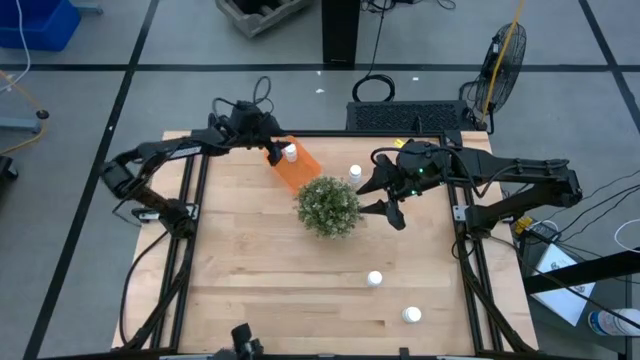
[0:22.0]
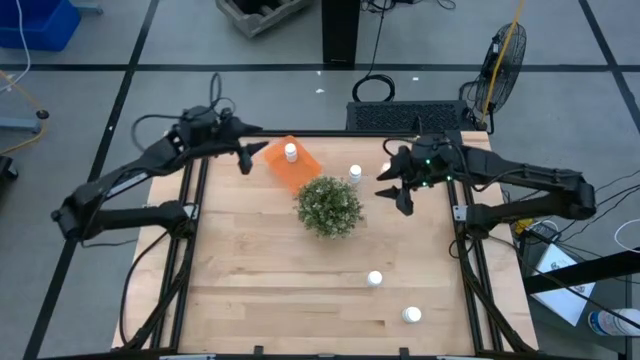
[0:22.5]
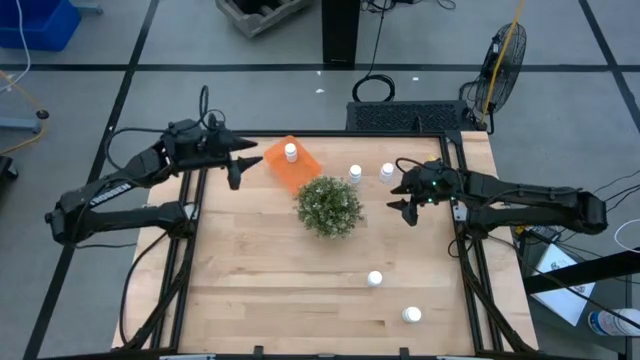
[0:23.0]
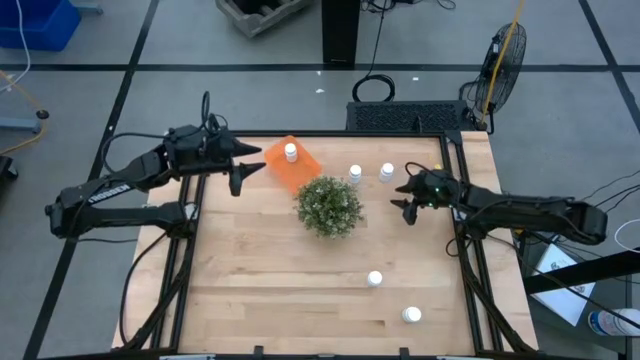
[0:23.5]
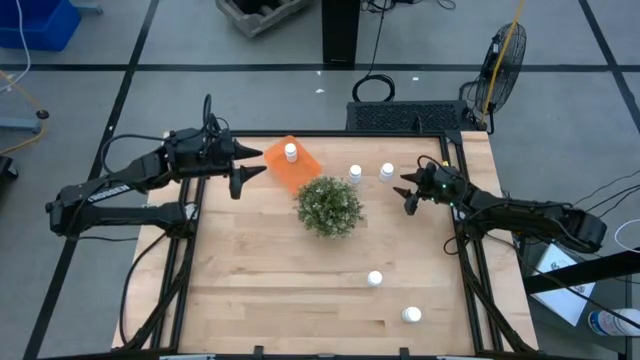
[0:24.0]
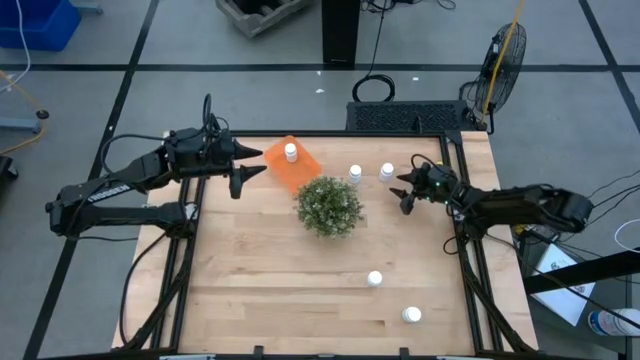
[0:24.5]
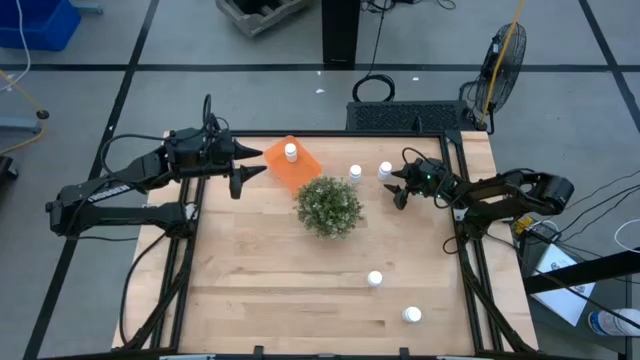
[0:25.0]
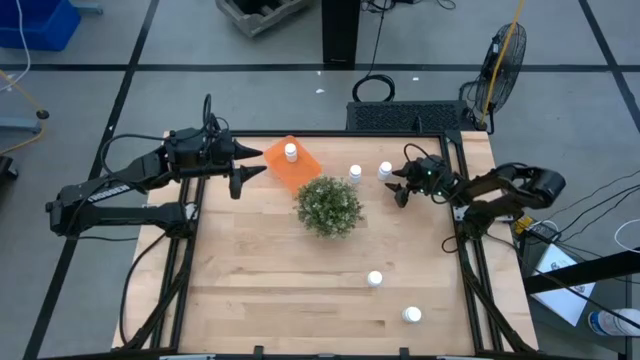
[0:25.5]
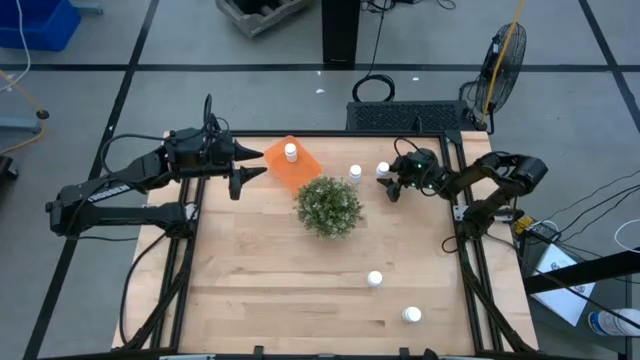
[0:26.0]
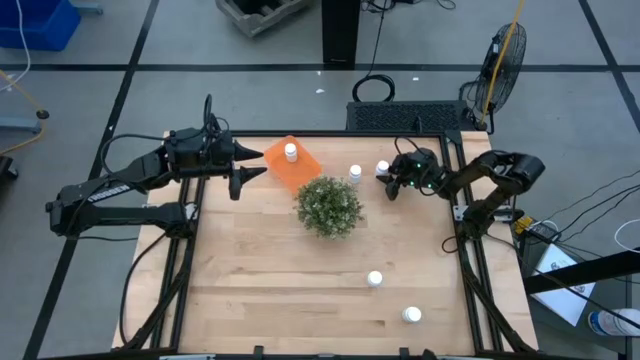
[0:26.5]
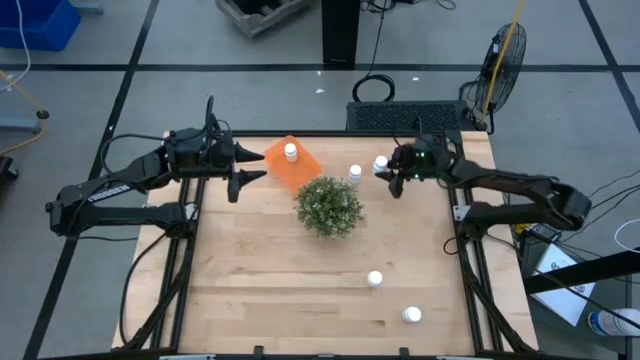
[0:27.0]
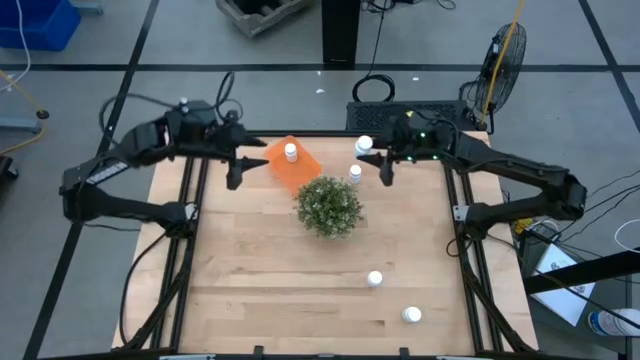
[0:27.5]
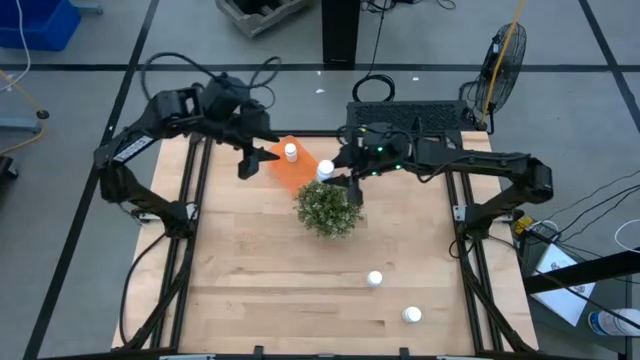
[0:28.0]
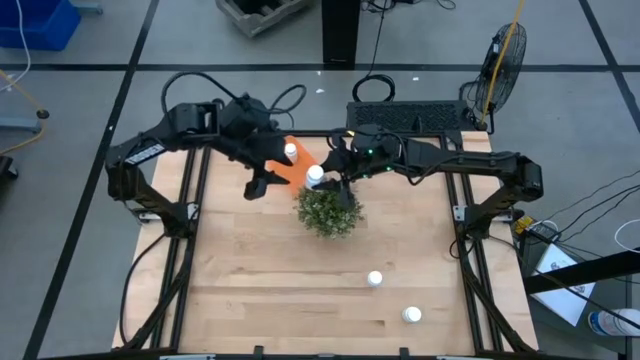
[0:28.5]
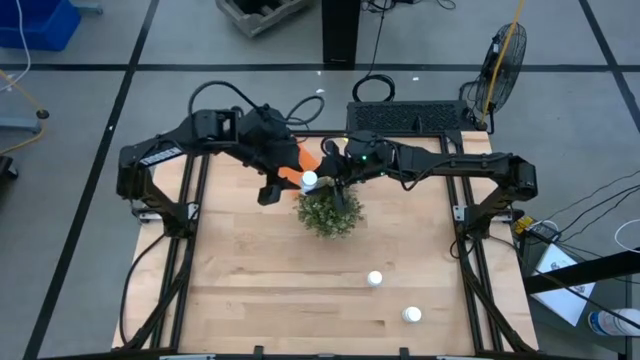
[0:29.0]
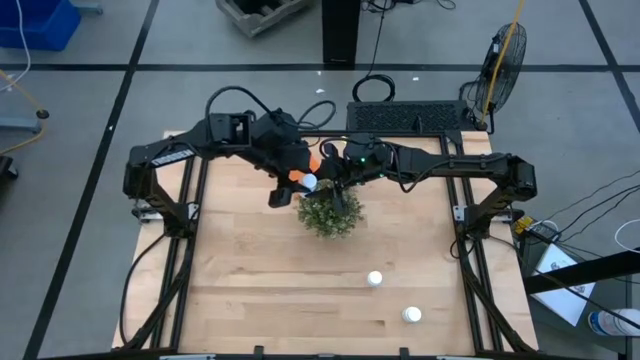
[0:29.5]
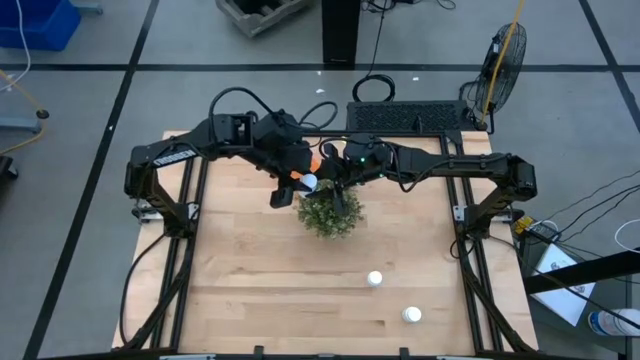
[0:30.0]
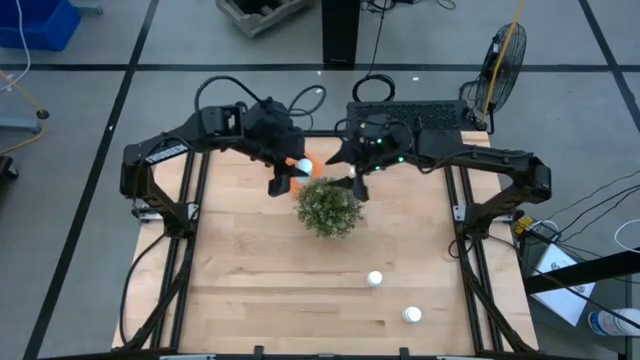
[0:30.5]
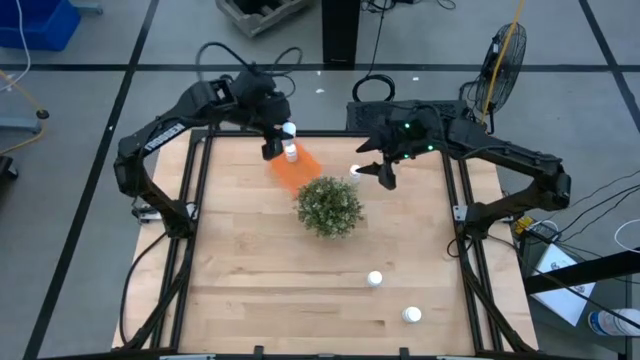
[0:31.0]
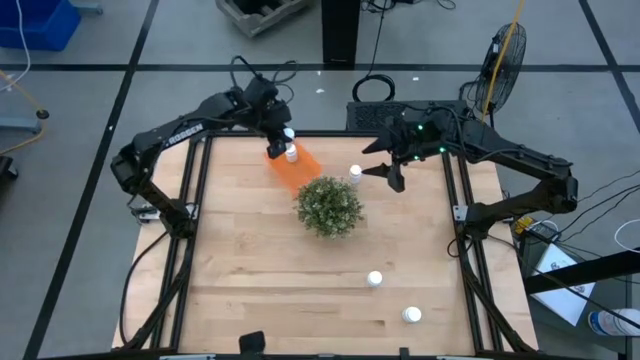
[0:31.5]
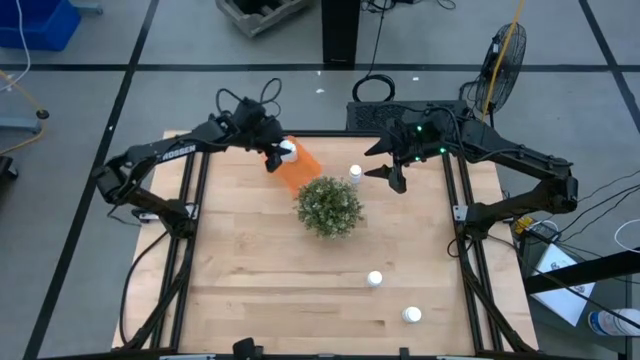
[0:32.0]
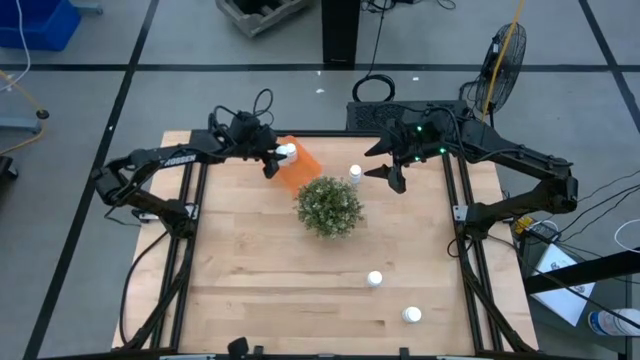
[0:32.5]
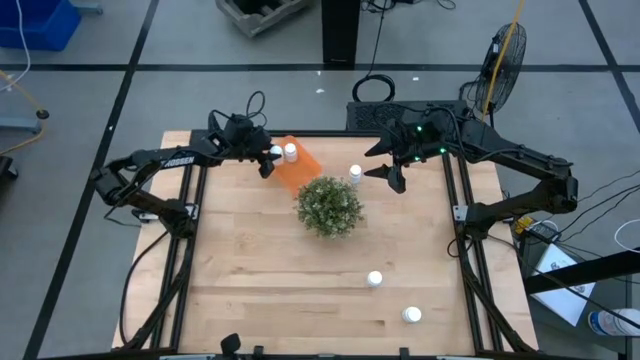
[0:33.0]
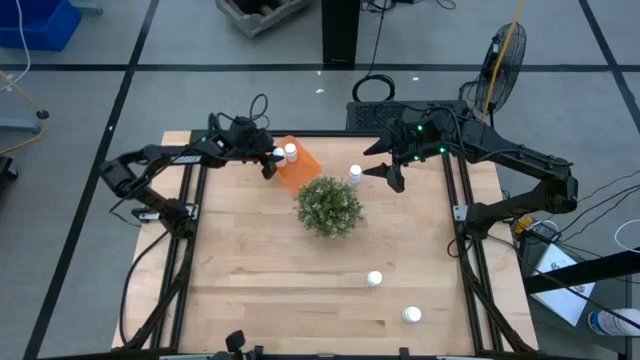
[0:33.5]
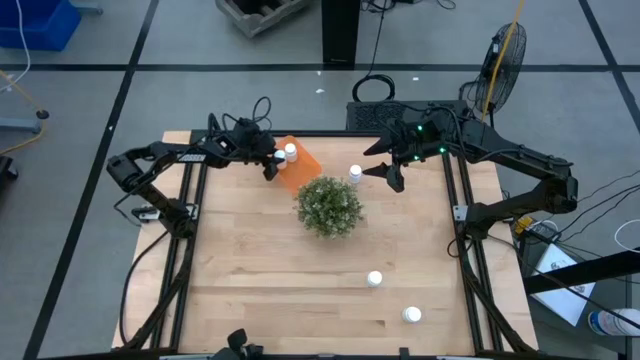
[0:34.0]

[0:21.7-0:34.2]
Task: Pick and place pill bottles into a basket
Put the white medicine bottle into the orange bin

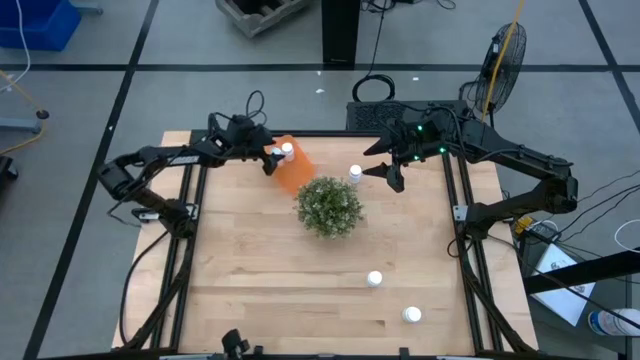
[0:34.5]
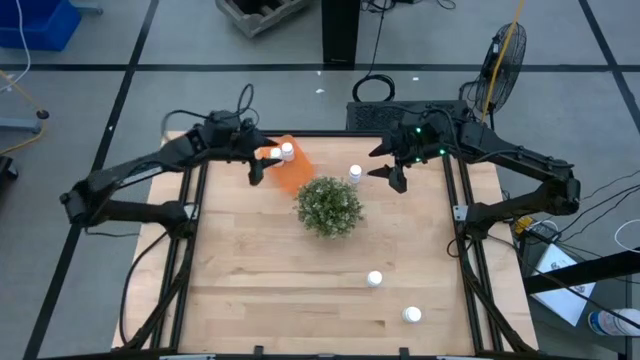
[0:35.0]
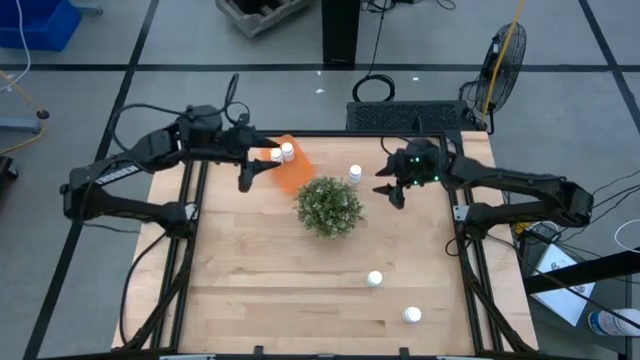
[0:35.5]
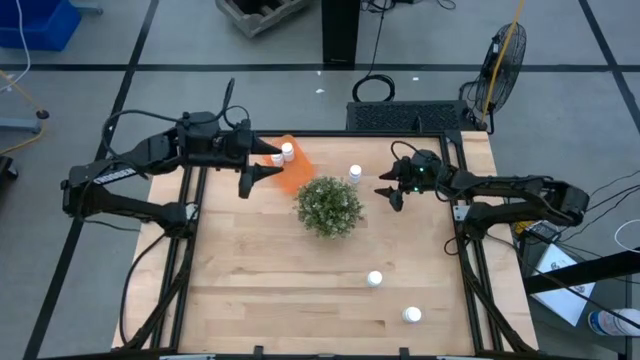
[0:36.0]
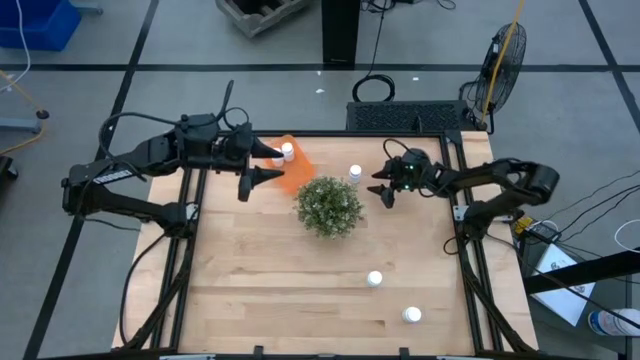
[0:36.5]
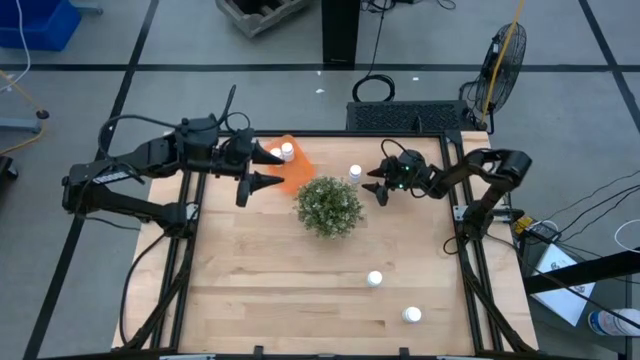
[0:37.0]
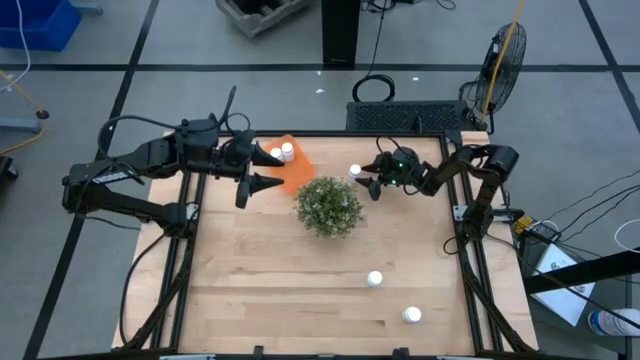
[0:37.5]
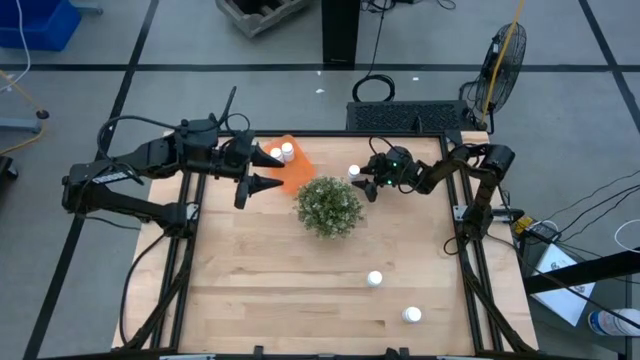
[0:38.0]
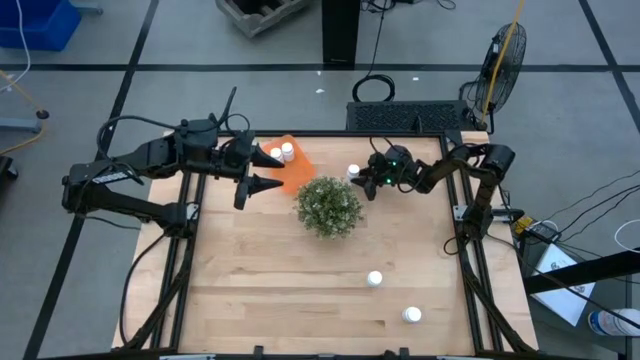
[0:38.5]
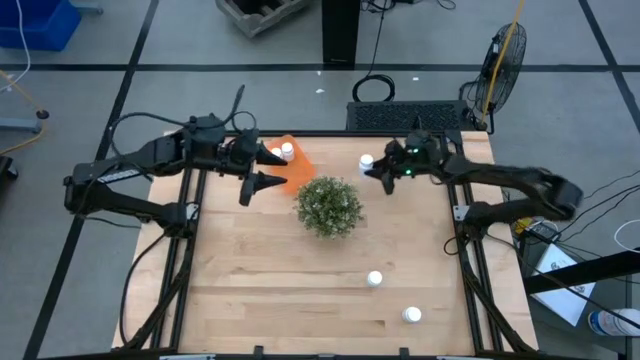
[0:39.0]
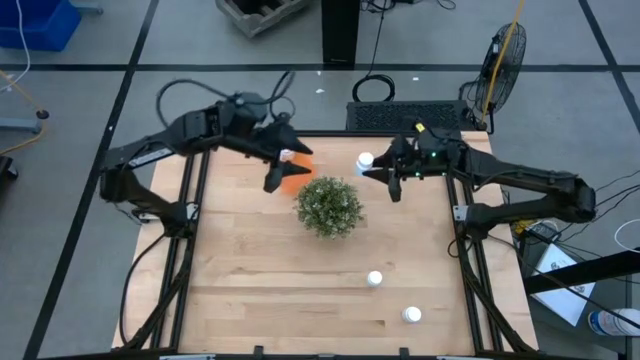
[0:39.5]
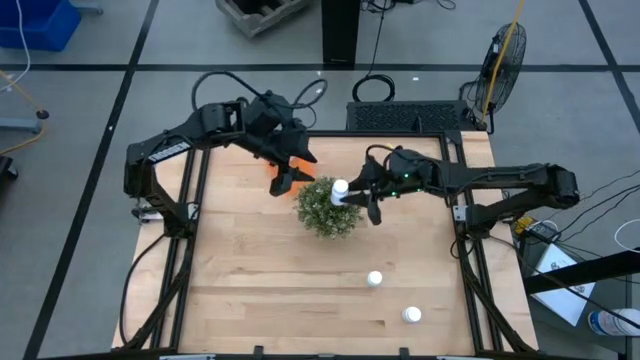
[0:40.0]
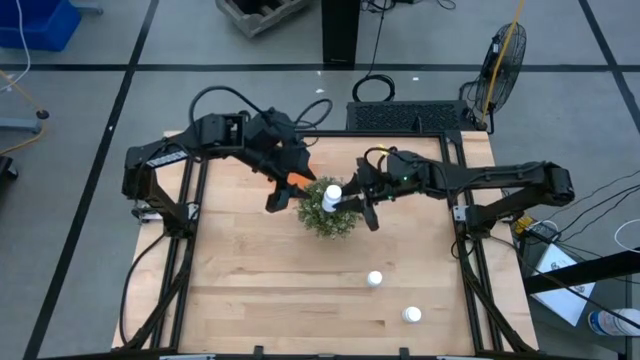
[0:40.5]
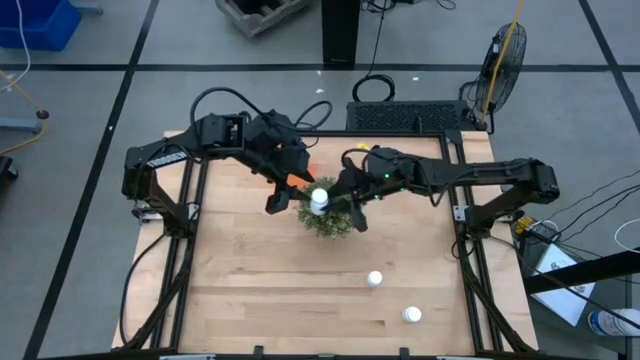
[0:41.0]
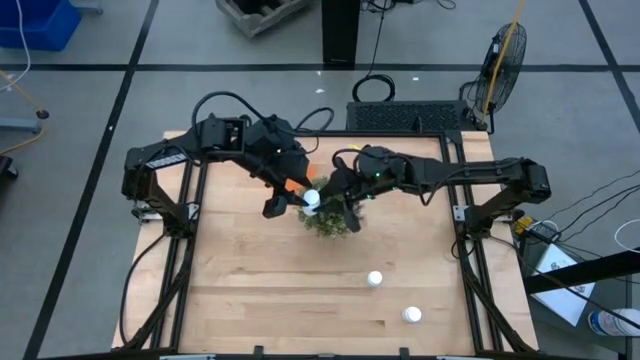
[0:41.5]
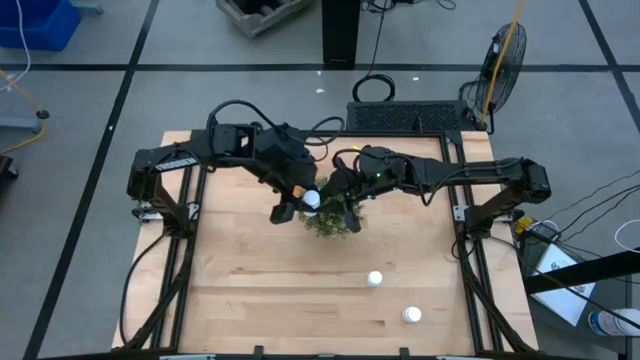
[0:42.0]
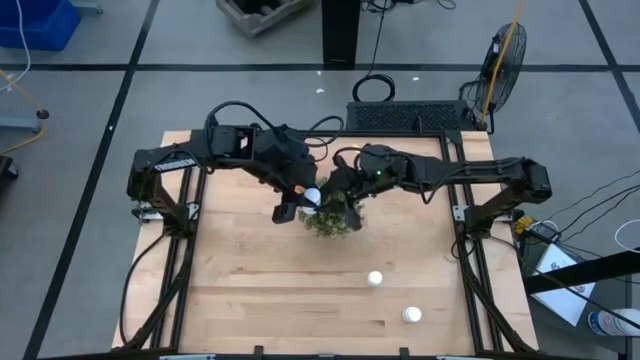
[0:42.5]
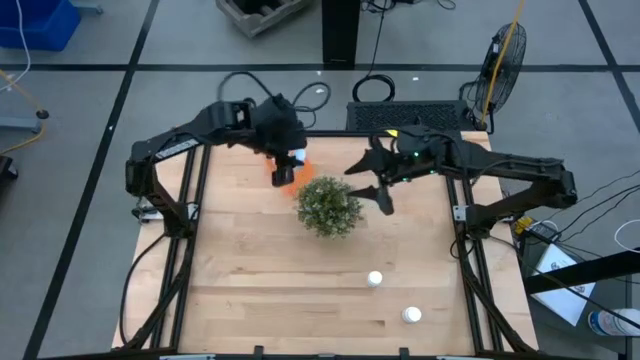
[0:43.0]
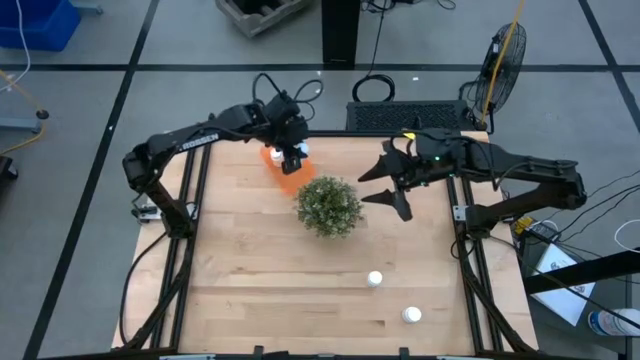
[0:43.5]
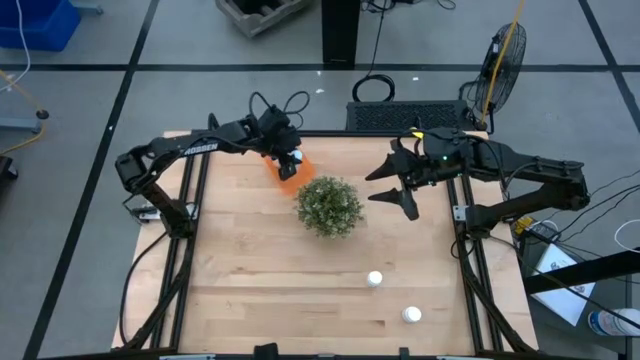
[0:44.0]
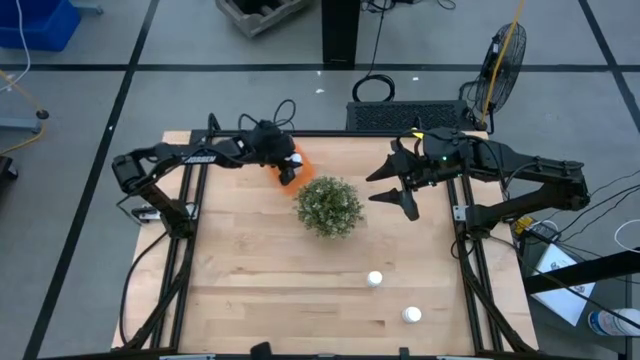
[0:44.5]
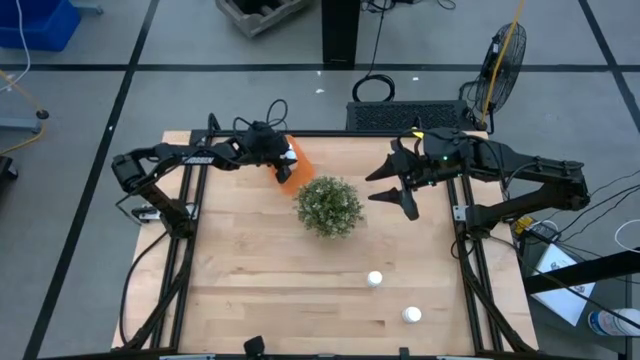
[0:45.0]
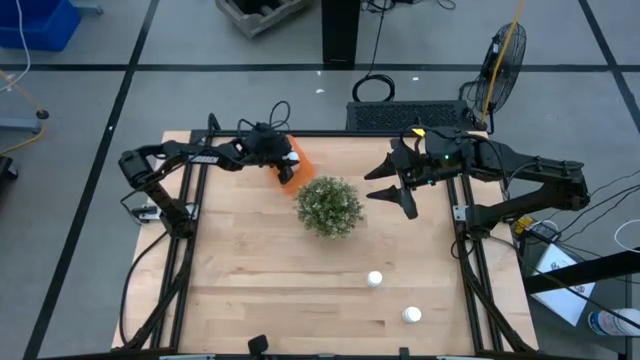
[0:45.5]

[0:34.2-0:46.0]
Put the white medicine bottle into the orange bin
